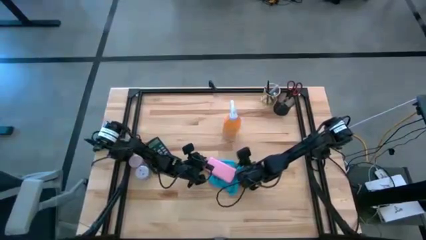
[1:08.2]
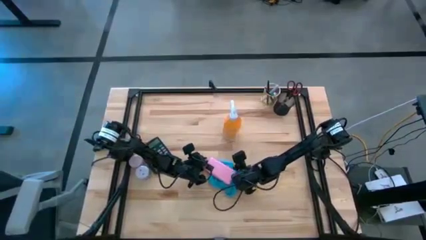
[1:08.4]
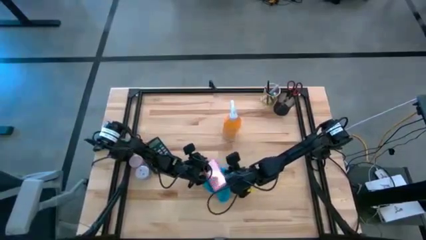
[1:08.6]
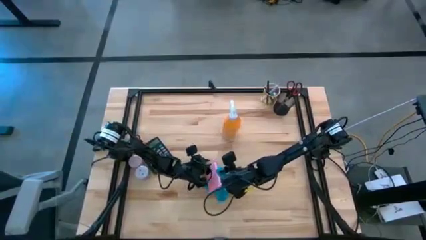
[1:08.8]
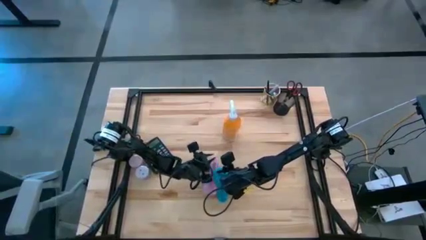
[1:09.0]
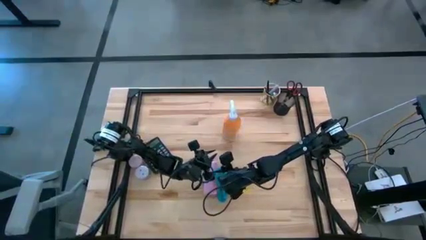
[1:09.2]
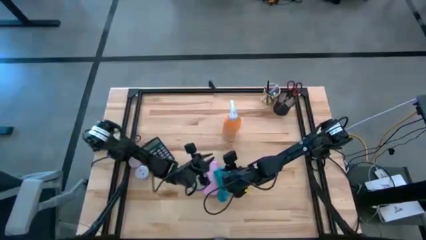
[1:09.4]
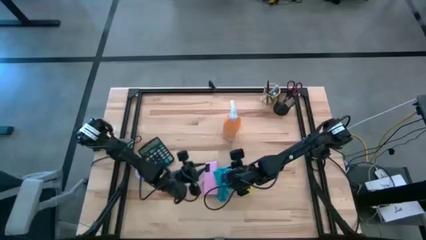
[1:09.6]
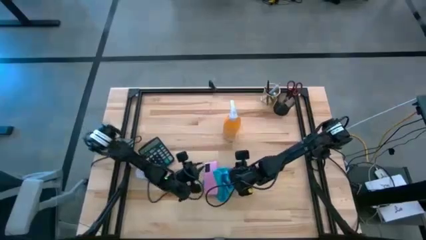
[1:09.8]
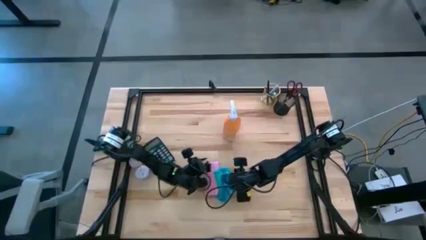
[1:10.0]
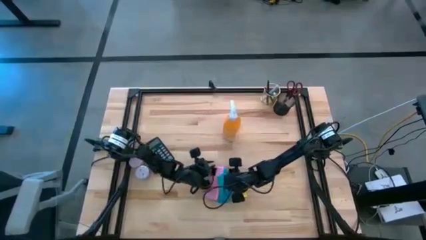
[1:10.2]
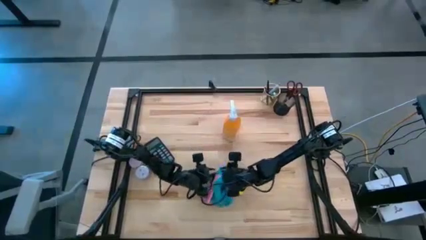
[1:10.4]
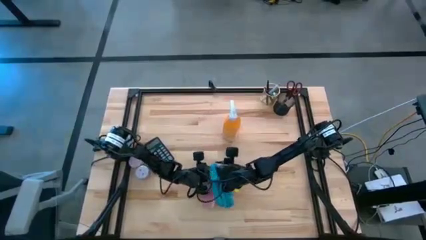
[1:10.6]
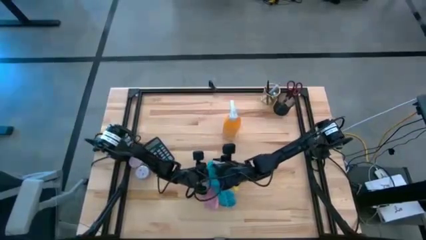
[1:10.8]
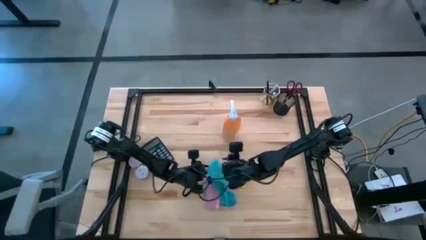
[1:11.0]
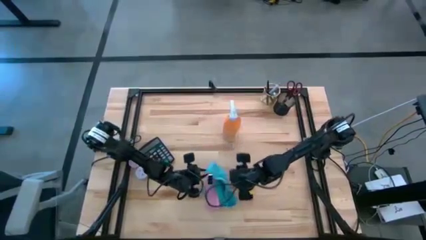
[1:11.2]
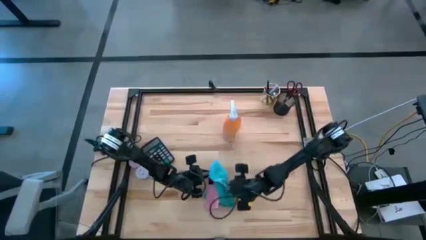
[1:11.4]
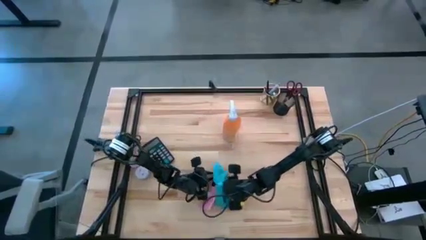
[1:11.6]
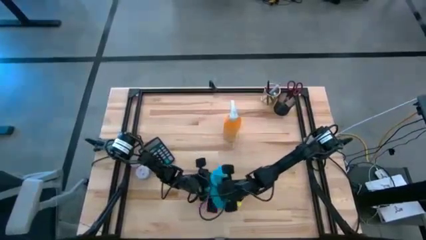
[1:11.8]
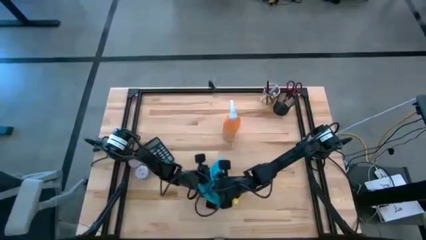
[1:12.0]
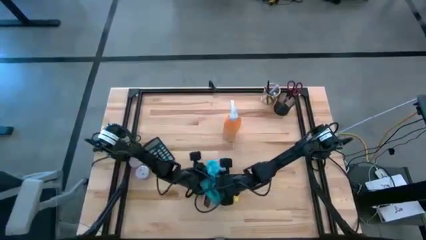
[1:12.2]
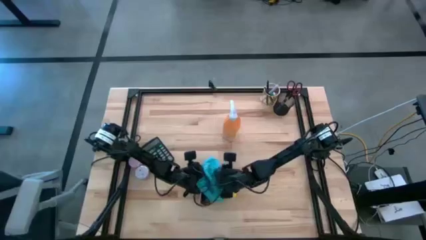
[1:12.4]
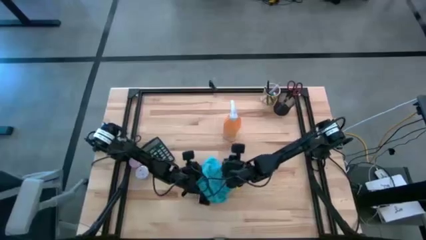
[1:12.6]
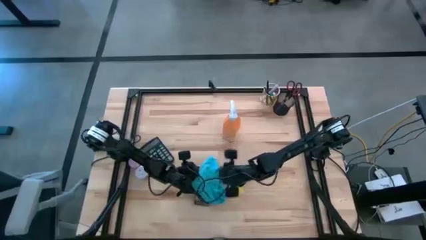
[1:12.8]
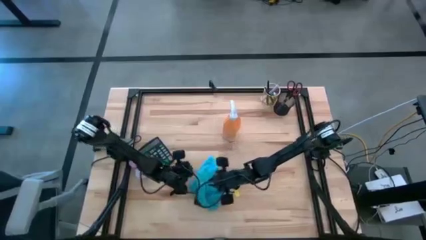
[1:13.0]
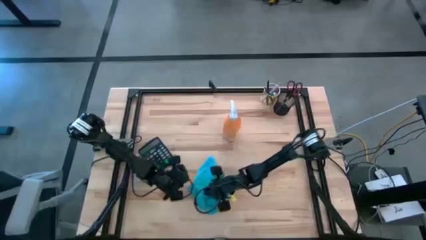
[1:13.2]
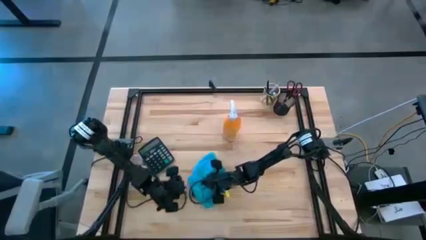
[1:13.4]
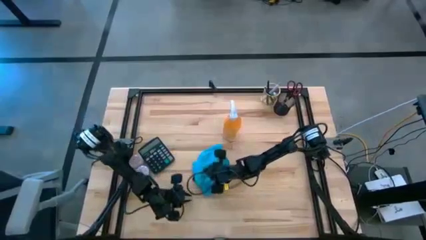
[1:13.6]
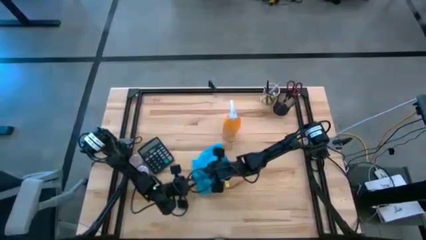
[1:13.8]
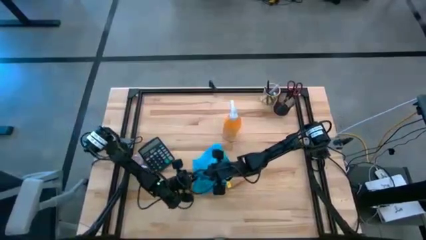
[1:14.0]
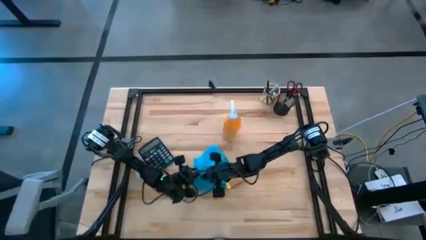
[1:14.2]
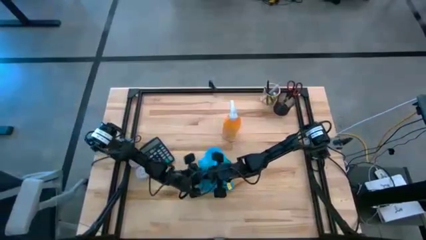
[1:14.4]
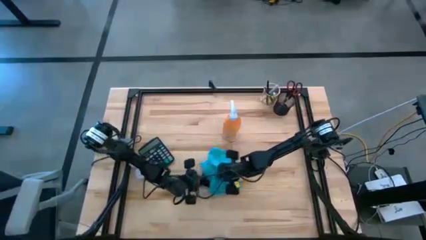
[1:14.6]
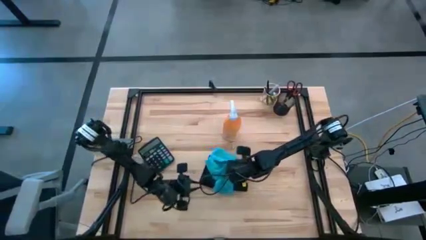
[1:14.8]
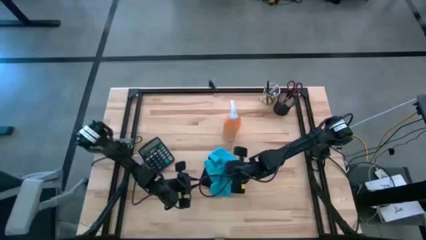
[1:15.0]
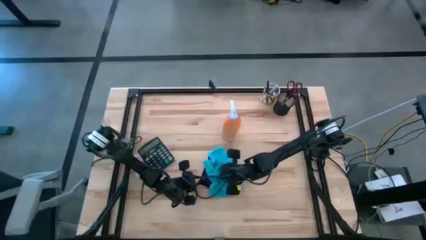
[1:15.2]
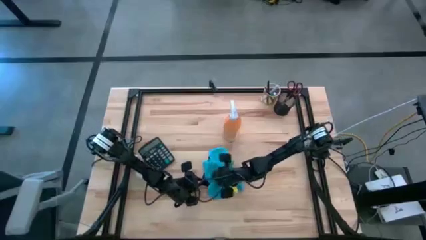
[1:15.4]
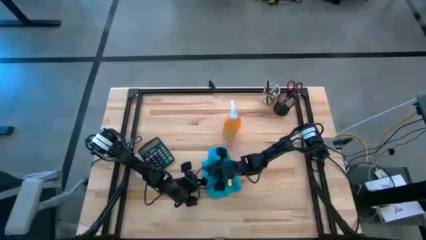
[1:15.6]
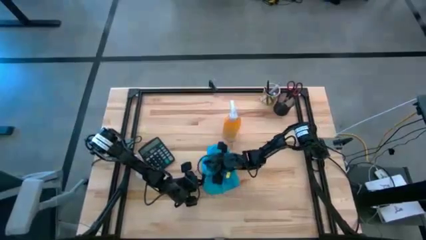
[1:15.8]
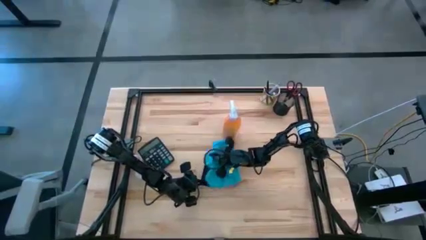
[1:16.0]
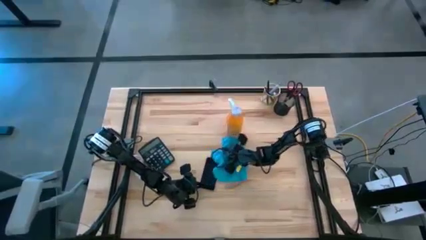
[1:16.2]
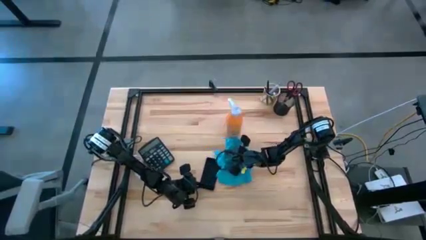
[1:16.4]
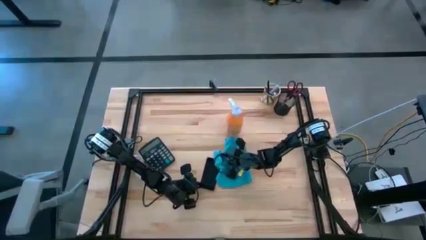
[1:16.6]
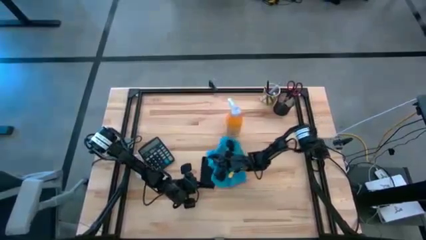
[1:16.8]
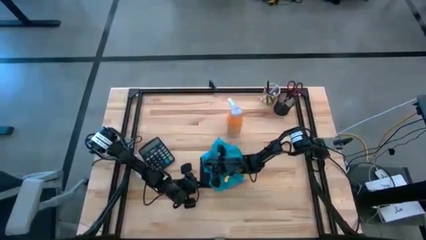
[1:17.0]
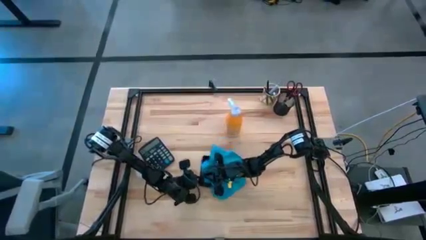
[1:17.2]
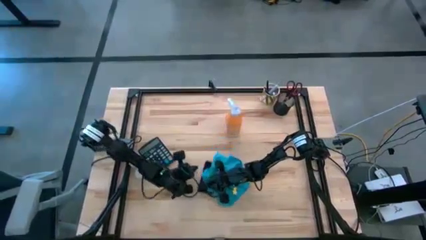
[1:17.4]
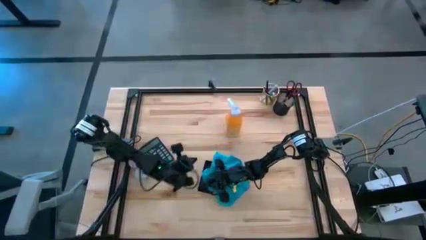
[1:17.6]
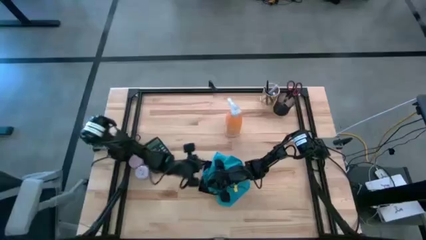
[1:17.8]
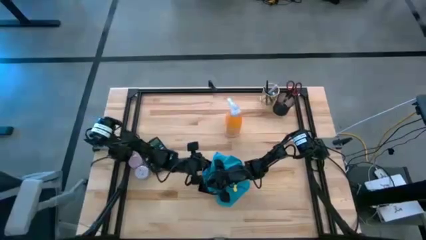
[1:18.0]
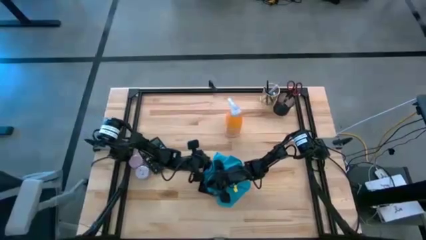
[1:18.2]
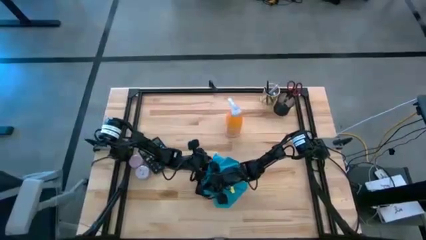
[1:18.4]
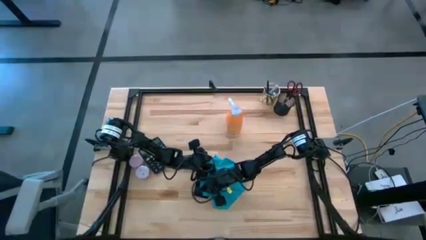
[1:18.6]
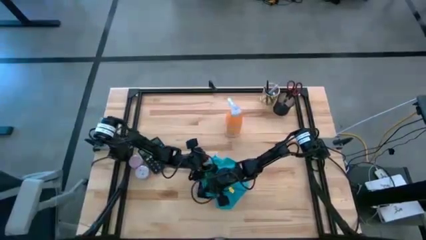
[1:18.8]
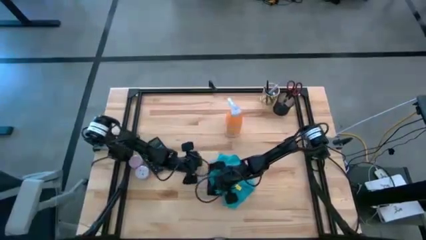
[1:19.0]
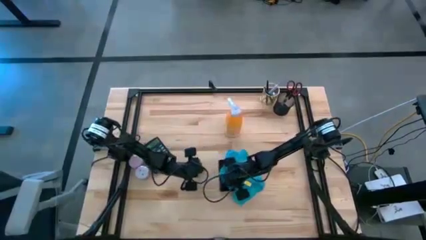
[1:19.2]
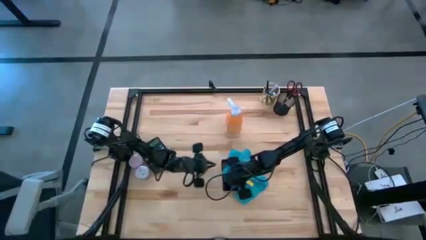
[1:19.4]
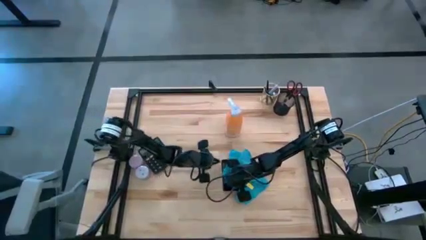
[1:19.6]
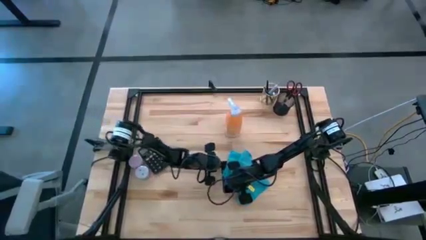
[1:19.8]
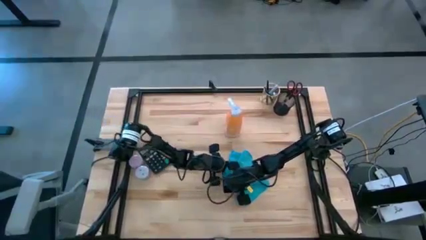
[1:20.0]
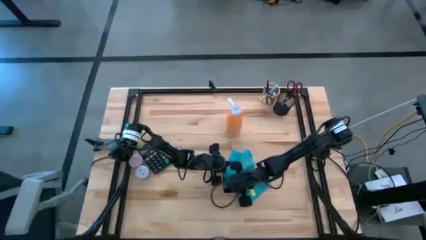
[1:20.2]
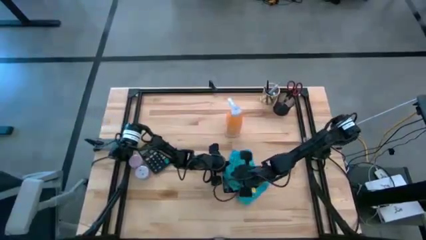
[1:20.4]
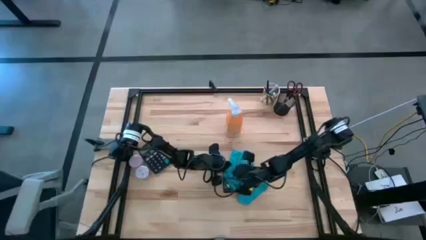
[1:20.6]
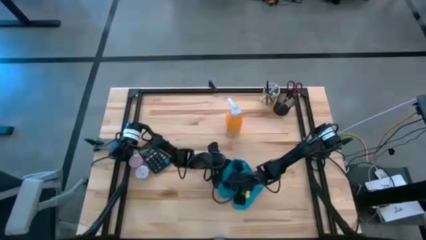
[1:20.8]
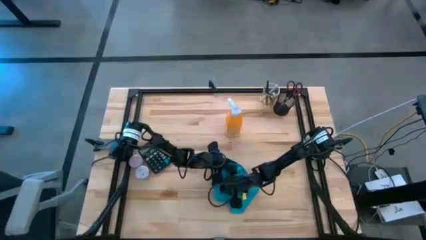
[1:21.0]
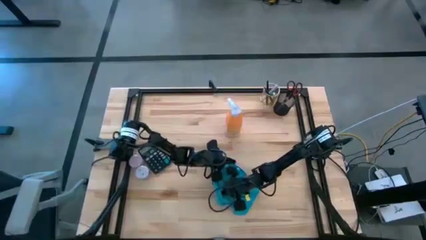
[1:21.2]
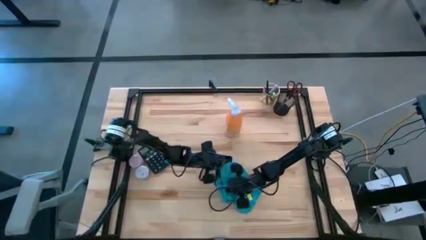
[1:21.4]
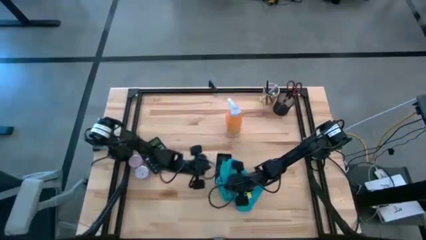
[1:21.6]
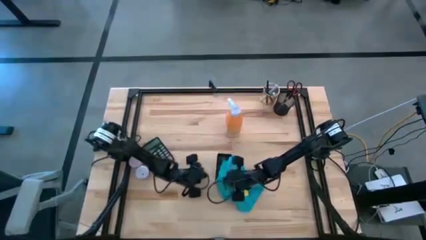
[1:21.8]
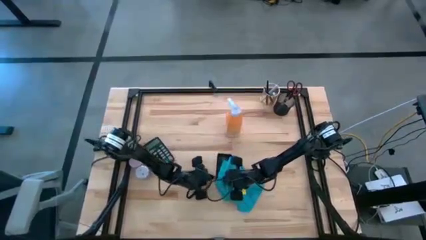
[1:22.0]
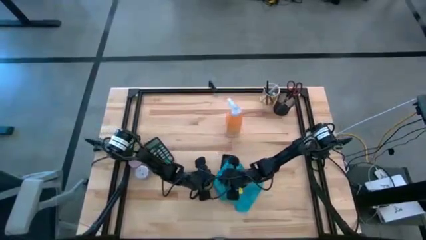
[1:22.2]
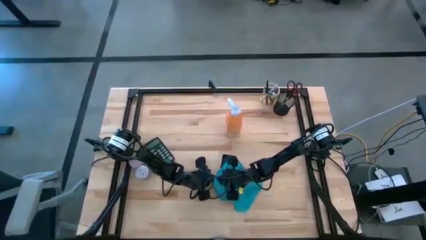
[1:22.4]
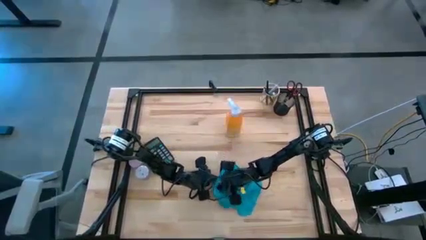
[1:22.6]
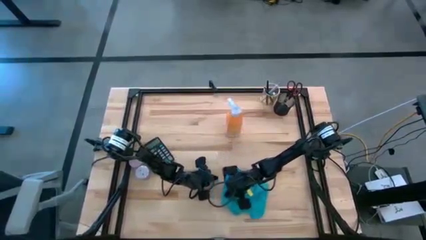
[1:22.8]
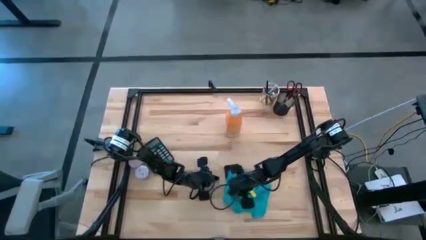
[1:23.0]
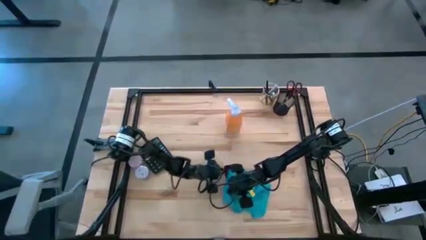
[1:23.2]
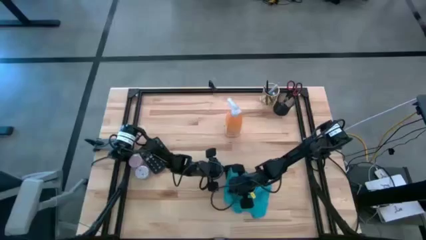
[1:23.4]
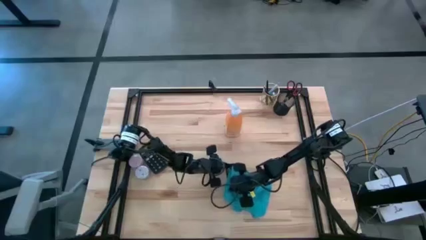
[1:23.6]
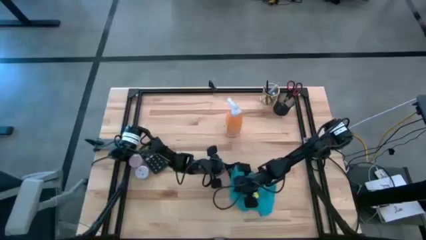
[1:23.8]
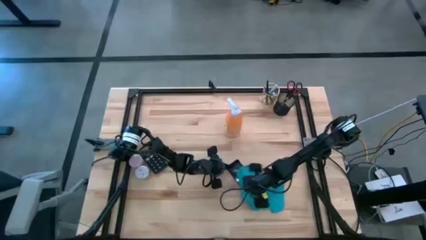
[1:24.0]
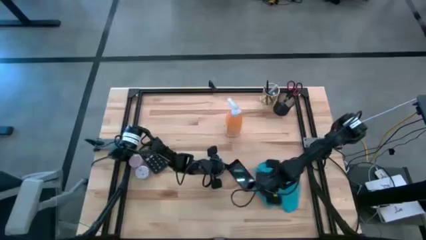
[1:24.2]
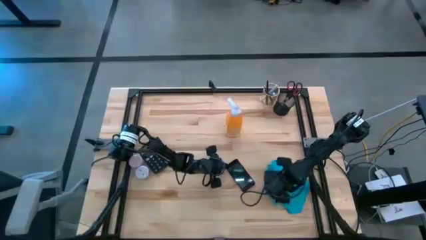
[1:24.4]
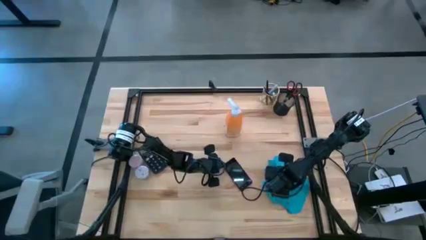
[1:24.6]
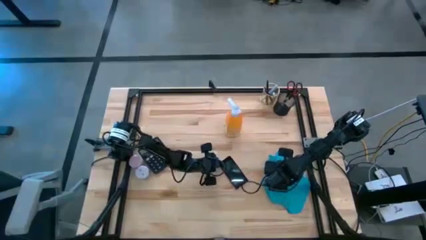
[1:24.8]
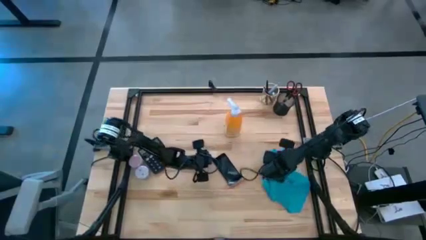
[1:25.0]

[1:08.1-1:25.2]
Task: Apply microfiber cloth
Wipe the pink cellphone with the blue microfiber cloth

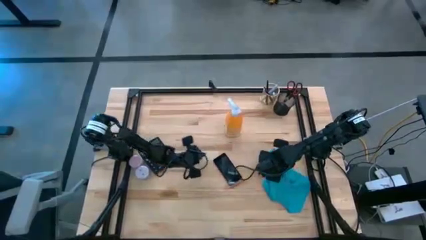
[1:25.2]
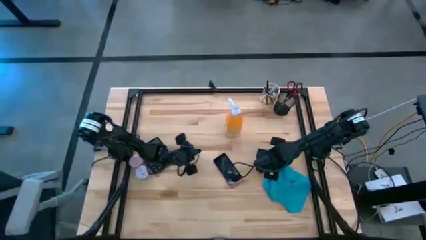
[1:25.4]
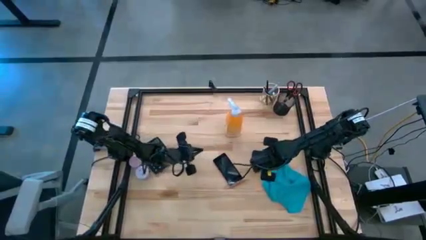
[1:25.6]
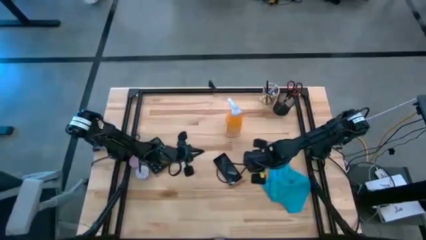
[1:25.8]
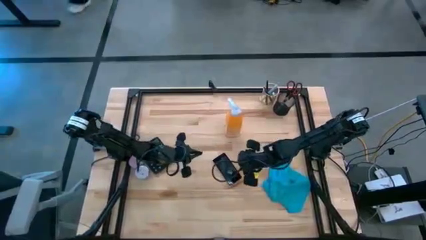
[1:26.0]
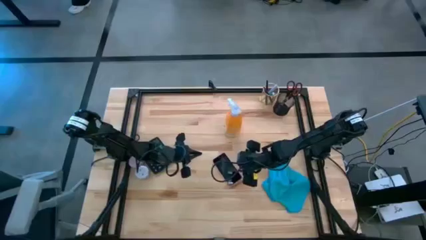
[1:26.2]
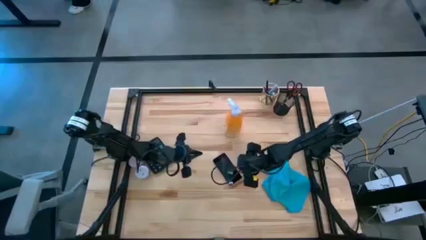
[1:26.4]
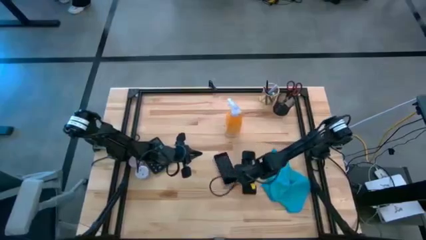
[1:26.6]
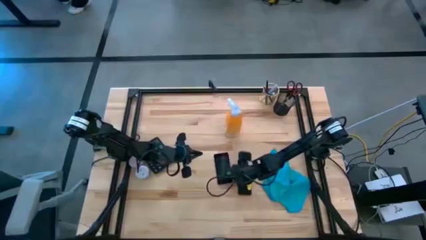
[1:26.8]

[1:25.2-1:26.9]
Adjust the pink cellphone
